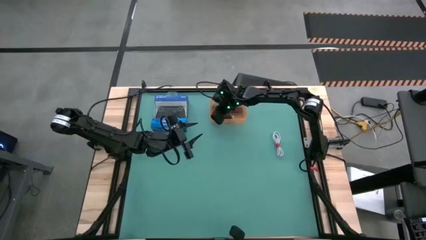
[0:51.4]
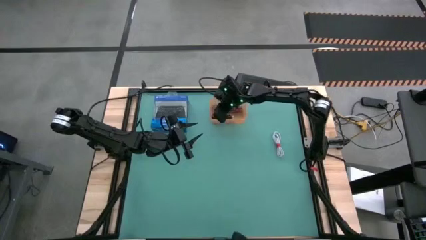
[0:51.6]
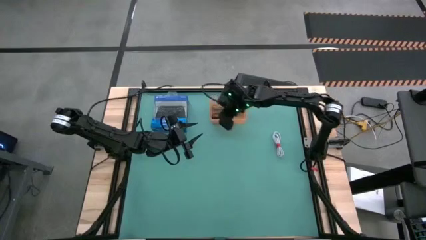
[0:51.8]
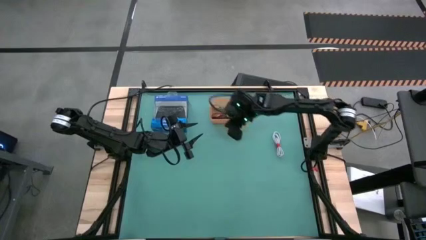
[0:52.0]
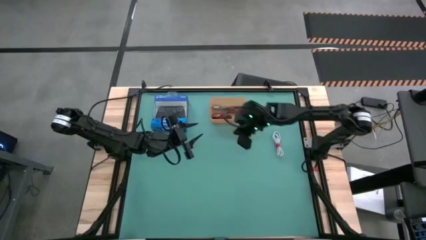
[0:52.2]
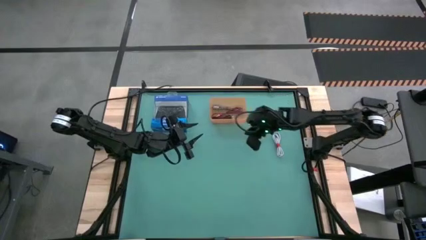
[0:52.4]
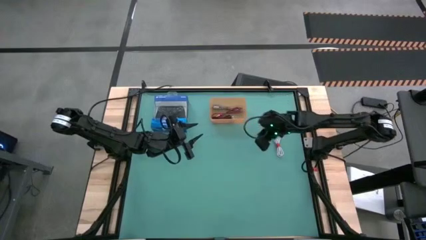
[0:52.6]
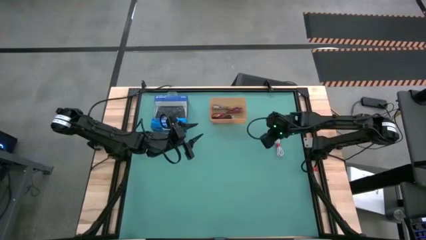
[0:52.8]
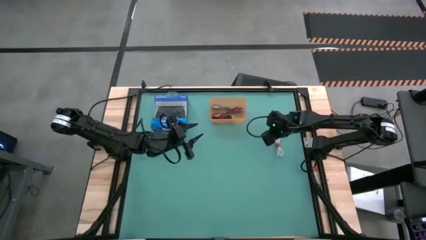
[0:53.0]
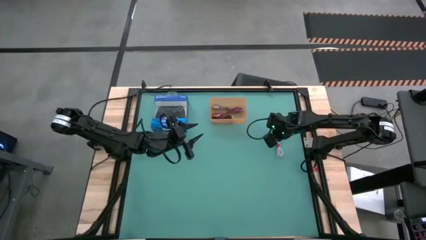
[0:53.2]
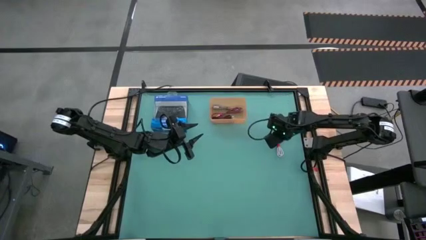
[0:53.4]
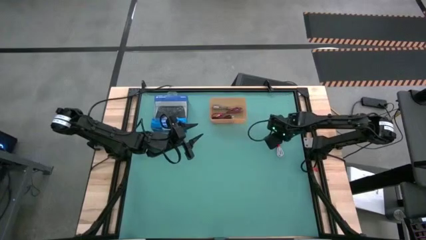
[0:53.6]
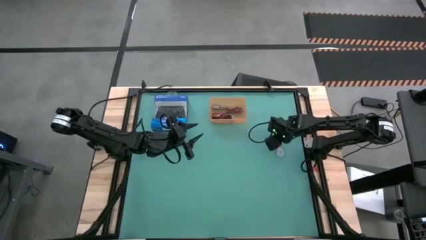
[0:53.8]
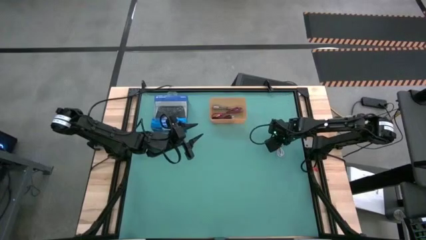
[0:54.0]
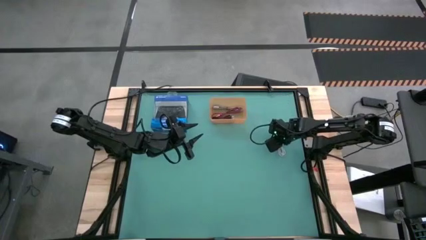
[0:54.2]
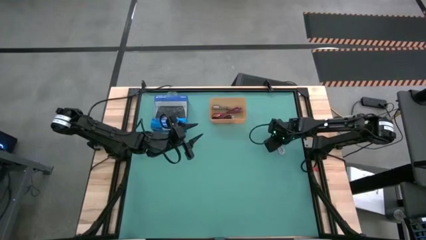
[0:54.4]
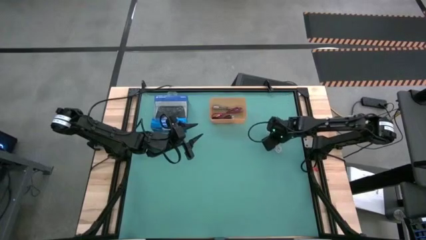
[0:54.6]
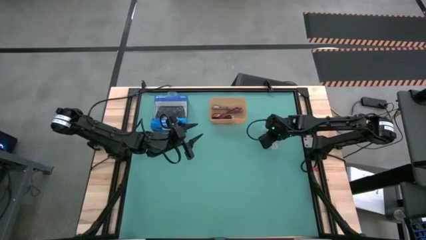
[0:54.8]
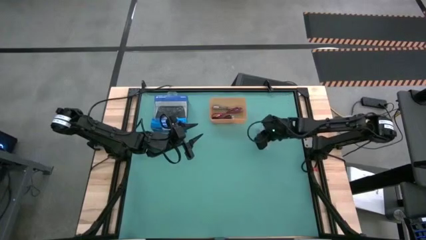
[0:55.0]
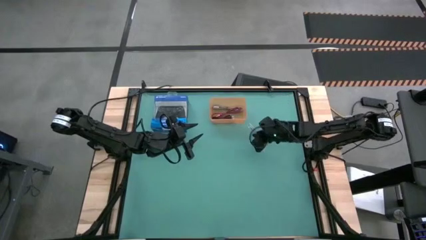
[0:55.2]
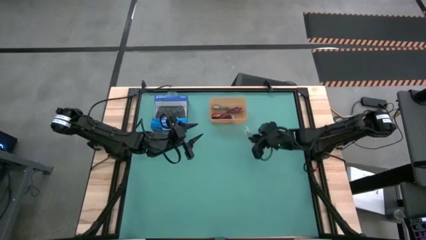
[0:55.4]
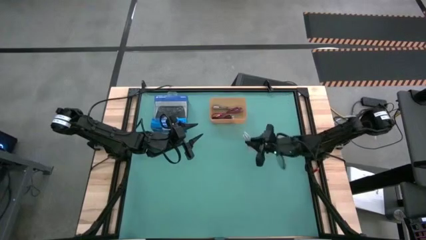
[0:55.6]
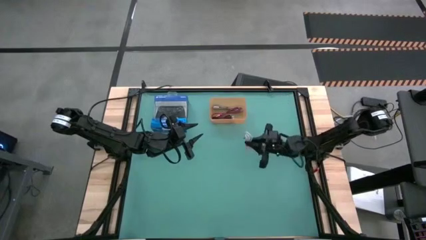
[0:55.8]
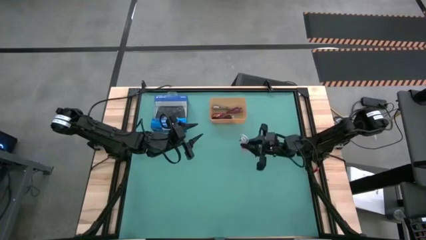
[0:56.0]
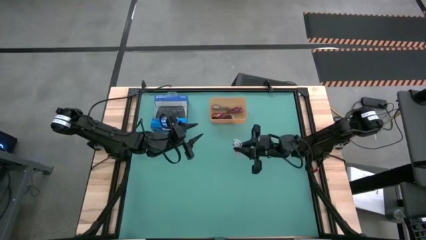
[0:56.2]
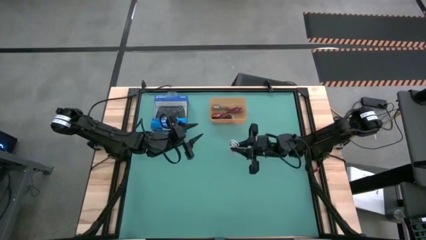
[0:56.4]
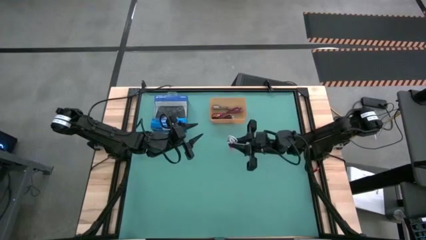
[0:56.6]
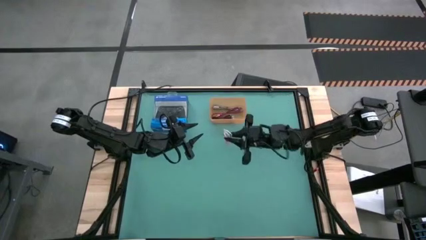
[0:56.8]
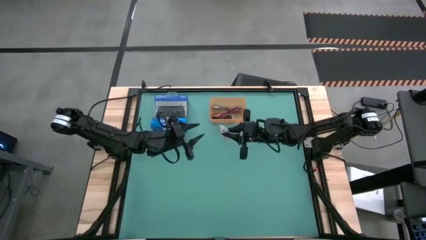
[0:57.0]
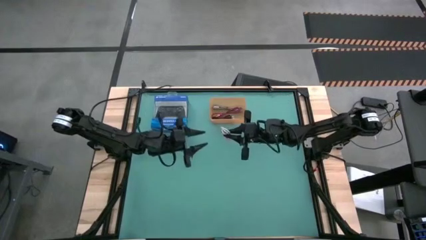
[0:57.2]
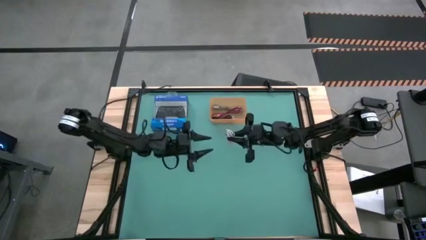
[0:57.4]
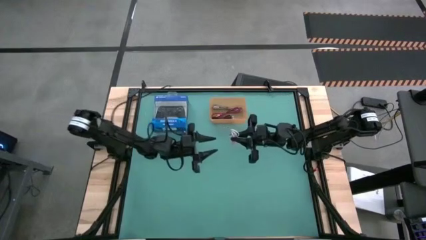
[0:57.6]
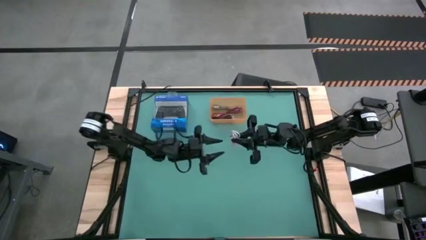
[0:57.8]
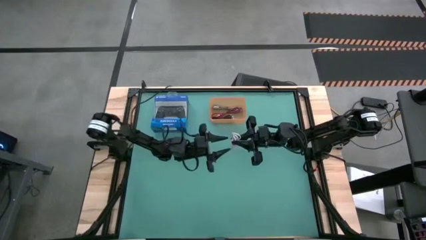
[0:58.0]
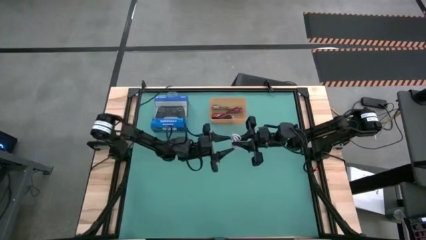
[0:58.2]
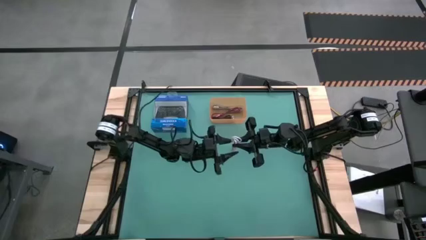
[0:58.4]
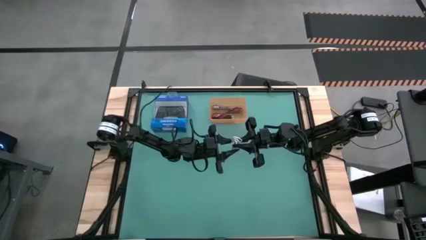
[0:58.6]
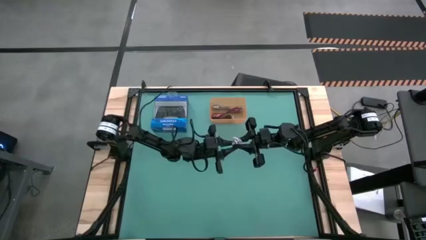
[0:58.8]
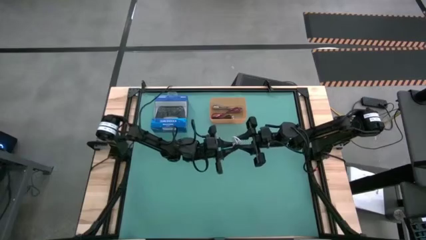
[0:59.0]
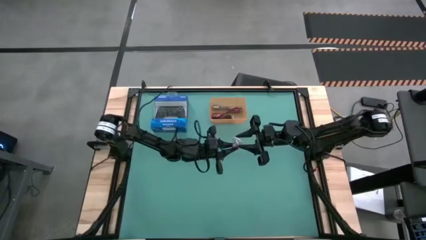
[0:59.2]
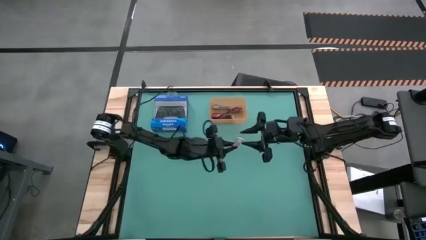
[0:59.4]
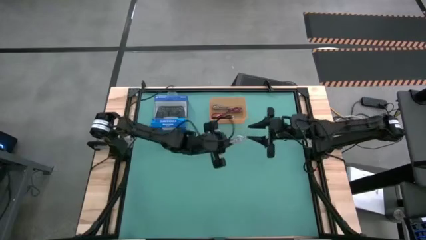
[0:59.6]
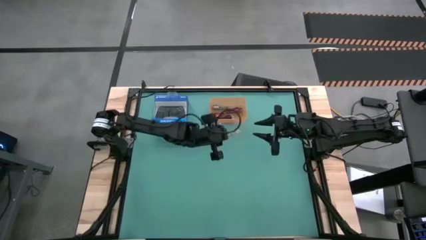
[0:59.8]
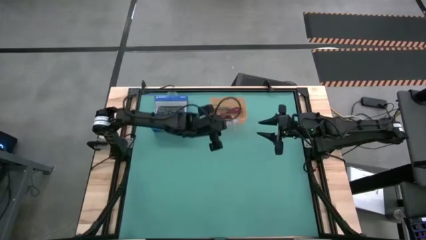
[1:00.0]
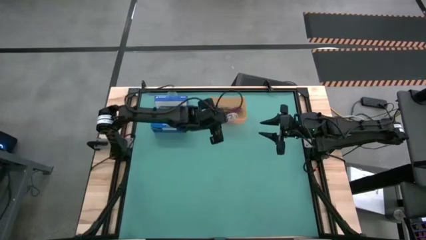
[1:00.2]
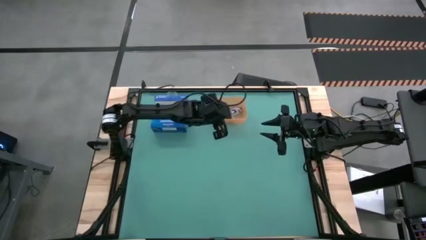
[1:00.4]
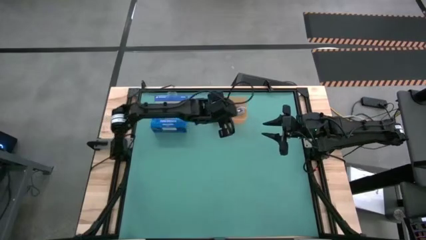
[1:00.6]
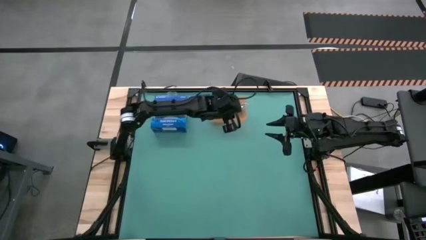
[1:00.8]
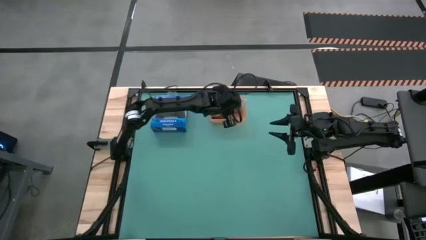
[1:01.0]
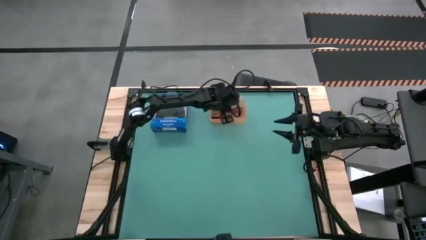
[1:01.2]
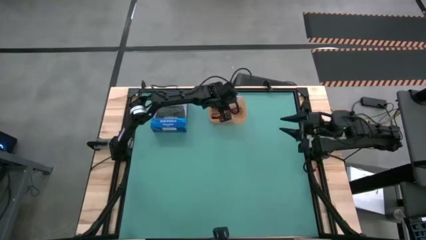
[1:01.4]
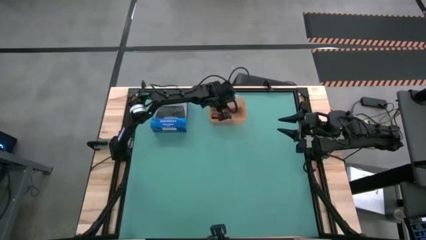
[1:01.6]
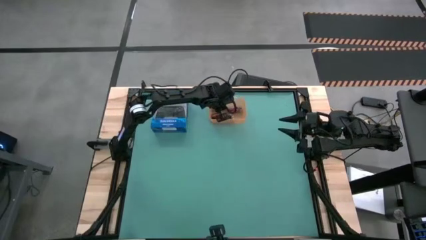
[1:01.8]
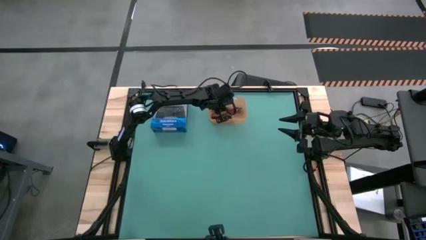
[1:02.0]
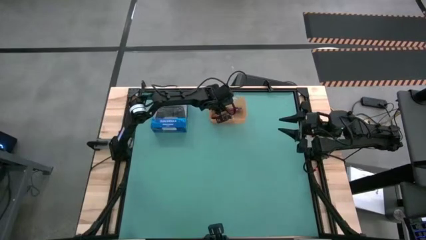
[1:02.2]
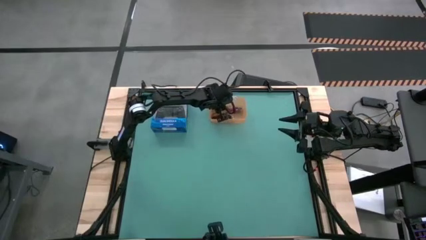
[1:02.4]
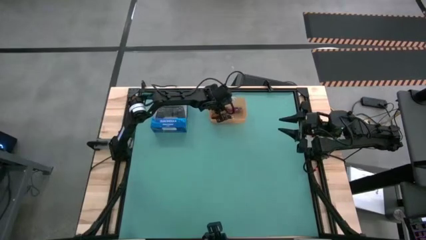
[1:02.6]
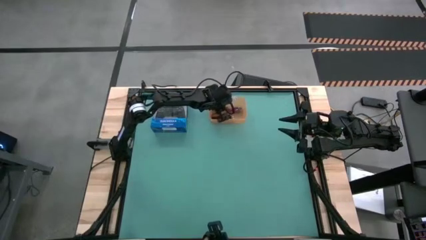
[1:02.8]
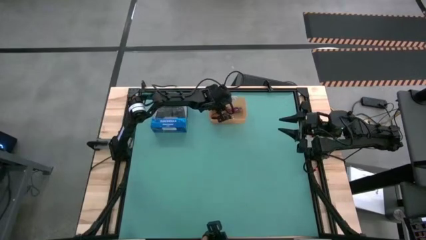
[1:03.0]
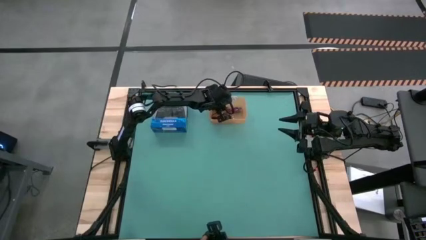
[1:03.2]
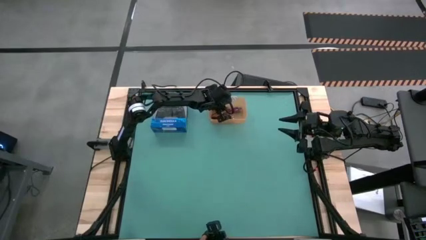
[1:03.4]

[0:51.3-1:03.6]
Task: Pick and place USB-C Cables
Put the white charger cable into the orange bin
